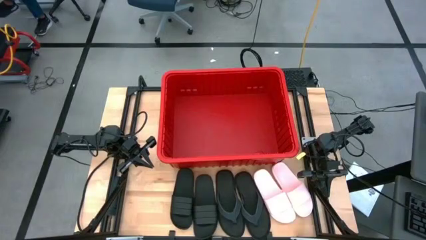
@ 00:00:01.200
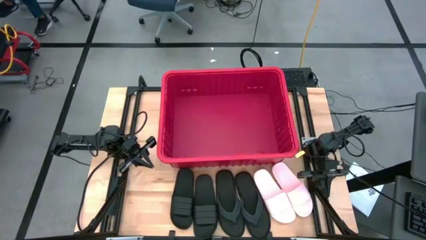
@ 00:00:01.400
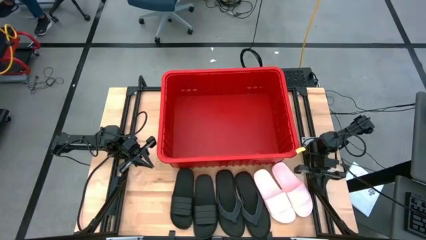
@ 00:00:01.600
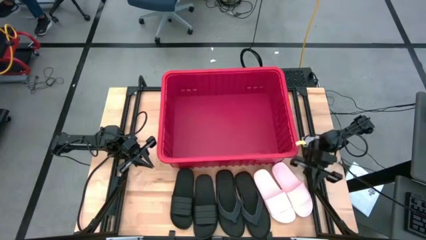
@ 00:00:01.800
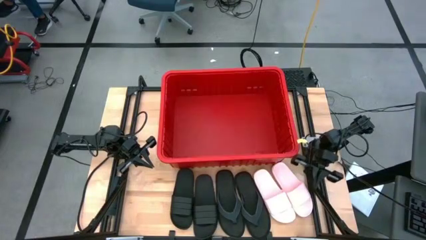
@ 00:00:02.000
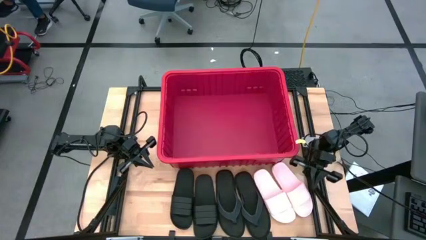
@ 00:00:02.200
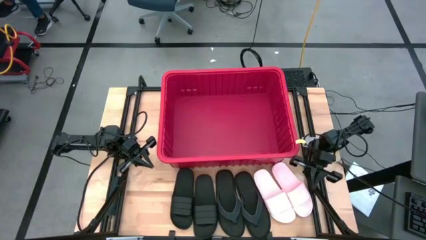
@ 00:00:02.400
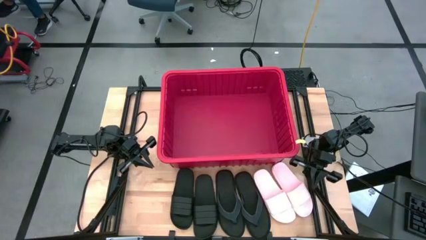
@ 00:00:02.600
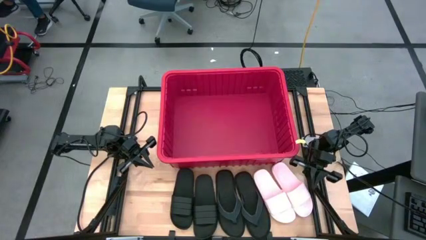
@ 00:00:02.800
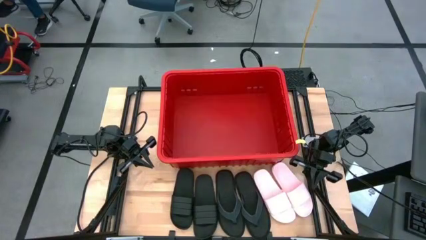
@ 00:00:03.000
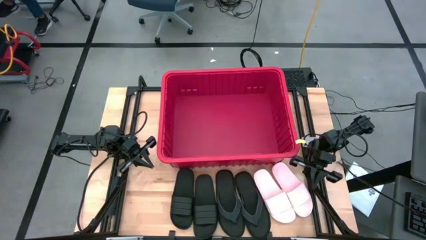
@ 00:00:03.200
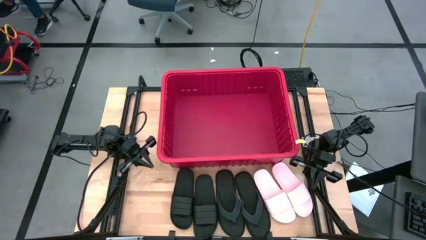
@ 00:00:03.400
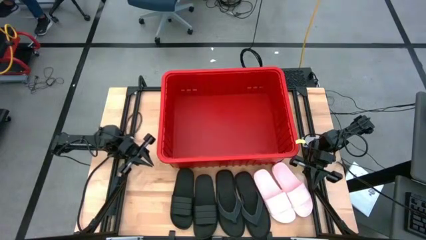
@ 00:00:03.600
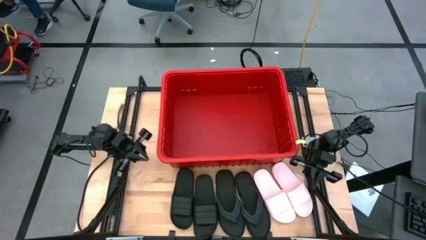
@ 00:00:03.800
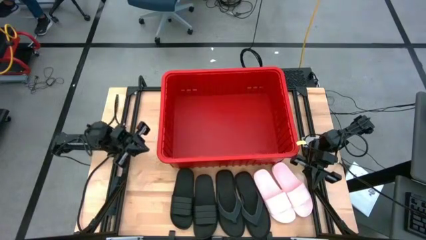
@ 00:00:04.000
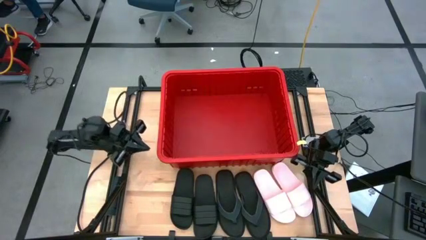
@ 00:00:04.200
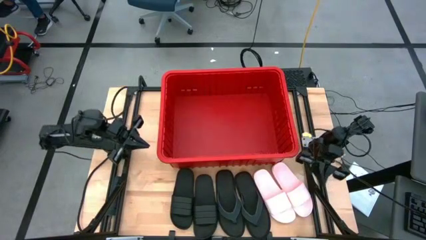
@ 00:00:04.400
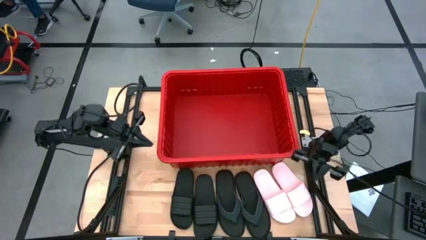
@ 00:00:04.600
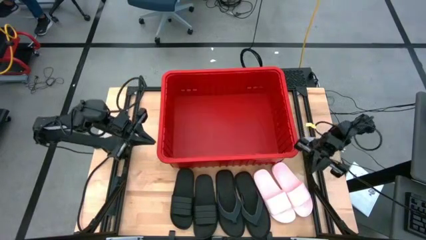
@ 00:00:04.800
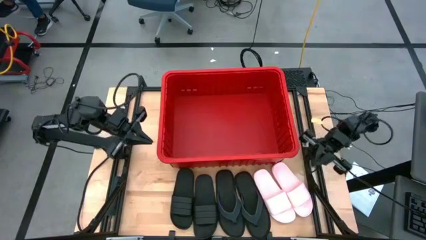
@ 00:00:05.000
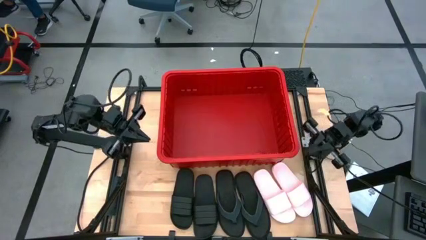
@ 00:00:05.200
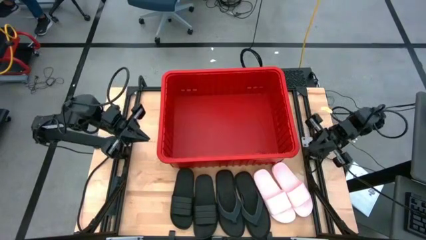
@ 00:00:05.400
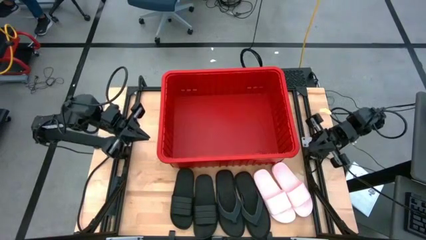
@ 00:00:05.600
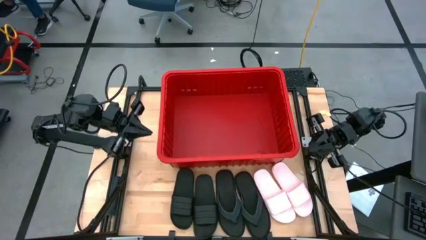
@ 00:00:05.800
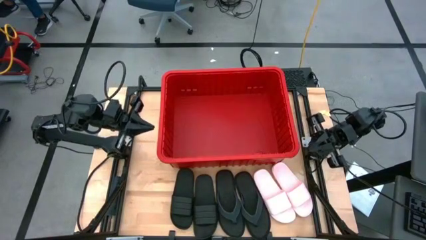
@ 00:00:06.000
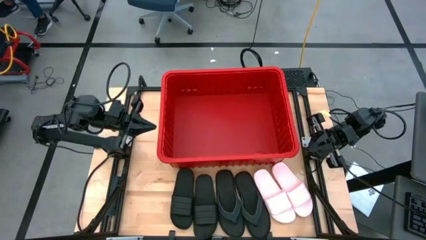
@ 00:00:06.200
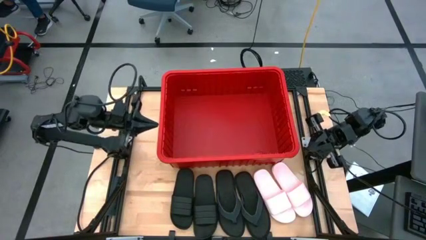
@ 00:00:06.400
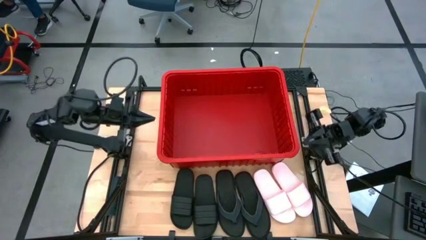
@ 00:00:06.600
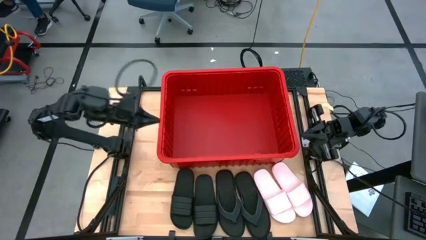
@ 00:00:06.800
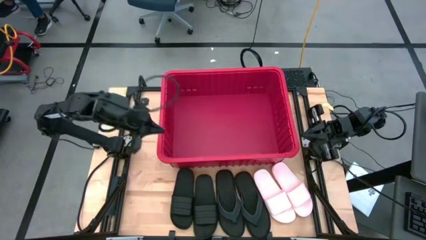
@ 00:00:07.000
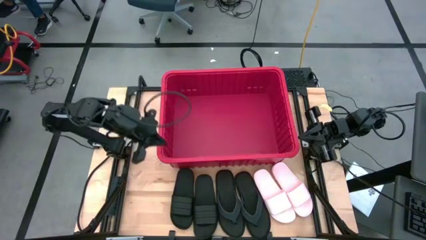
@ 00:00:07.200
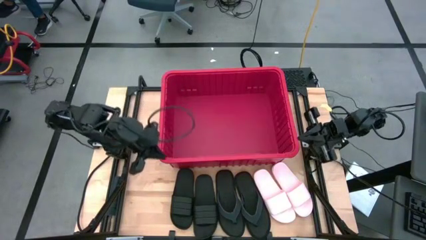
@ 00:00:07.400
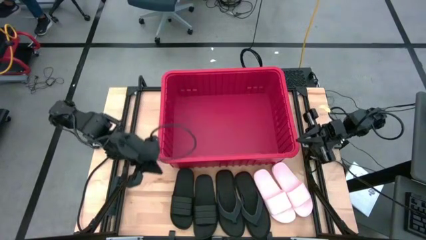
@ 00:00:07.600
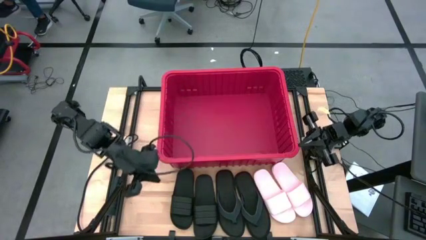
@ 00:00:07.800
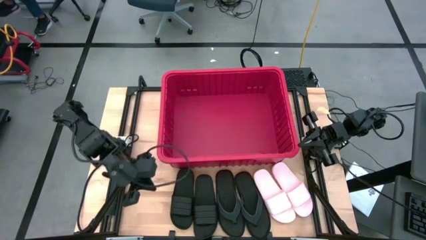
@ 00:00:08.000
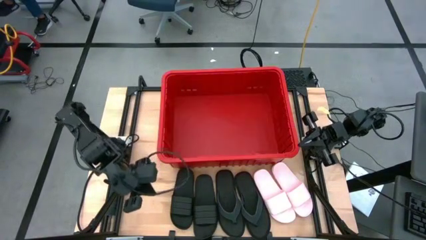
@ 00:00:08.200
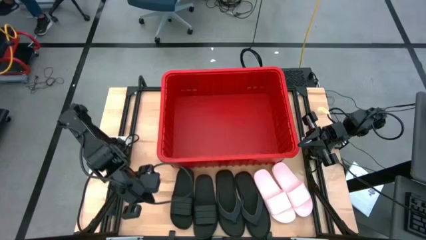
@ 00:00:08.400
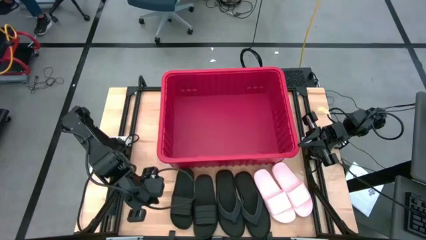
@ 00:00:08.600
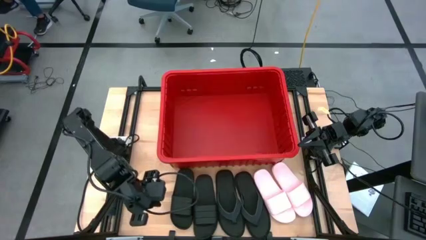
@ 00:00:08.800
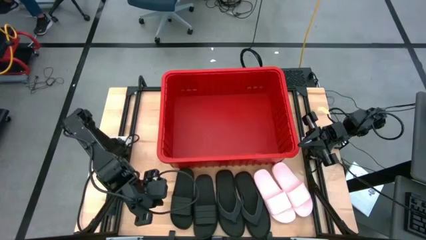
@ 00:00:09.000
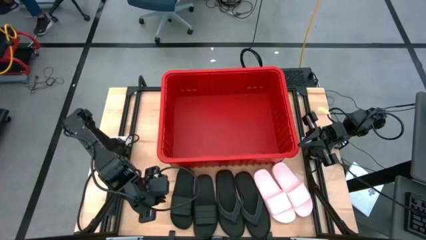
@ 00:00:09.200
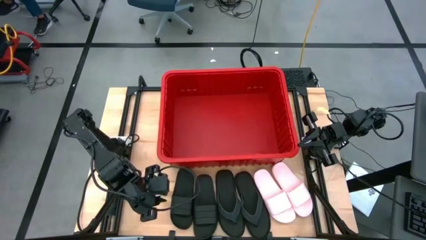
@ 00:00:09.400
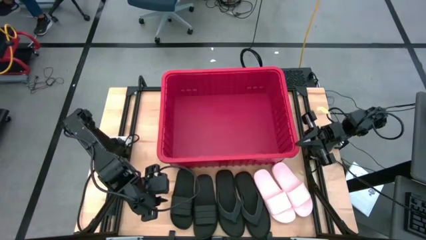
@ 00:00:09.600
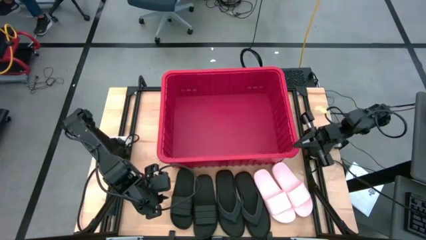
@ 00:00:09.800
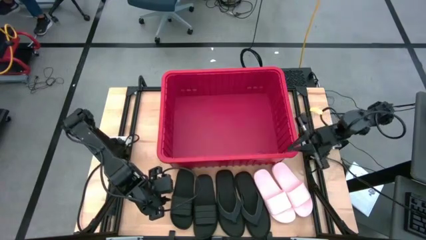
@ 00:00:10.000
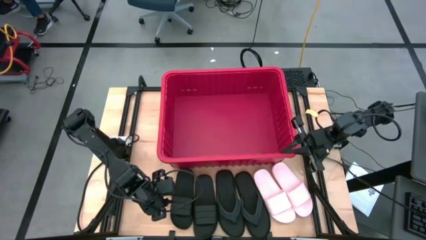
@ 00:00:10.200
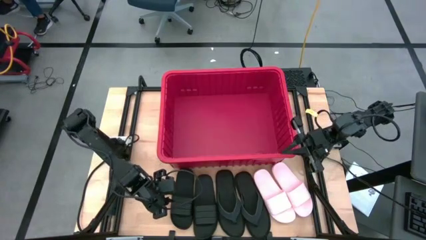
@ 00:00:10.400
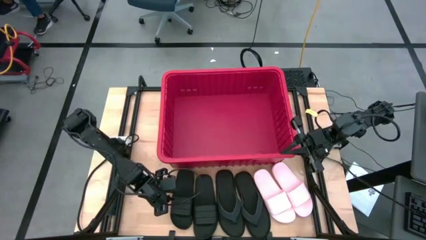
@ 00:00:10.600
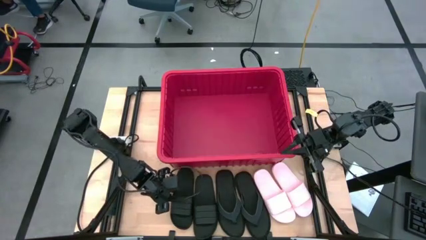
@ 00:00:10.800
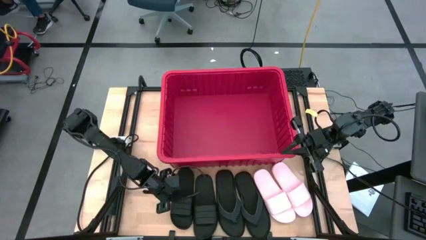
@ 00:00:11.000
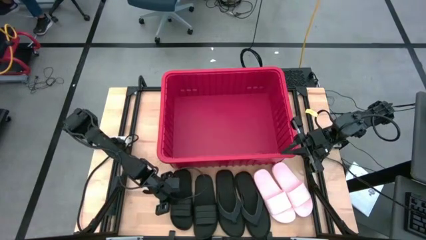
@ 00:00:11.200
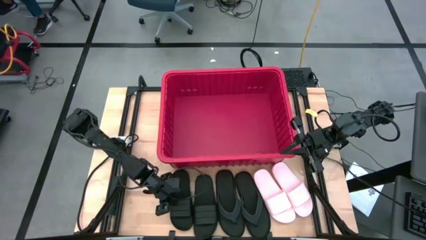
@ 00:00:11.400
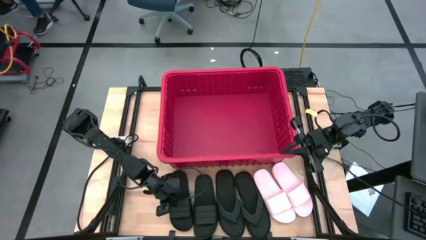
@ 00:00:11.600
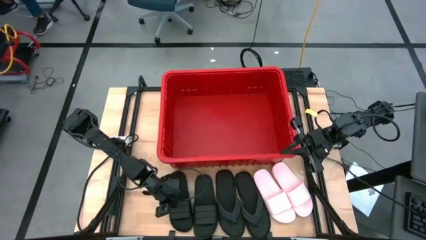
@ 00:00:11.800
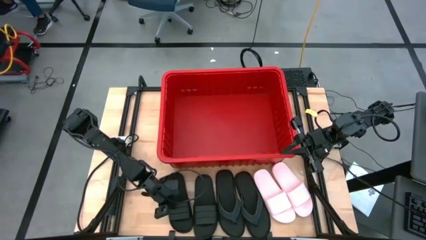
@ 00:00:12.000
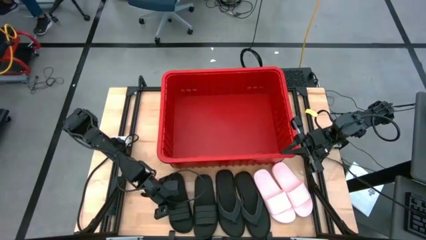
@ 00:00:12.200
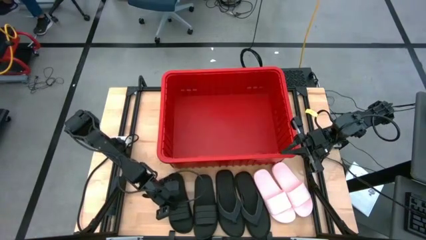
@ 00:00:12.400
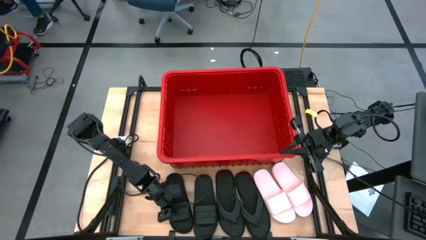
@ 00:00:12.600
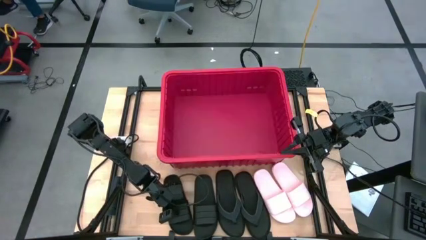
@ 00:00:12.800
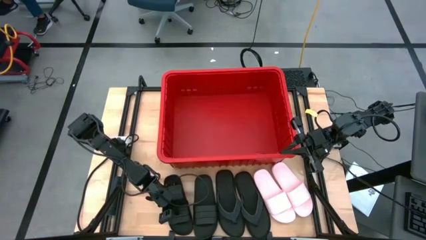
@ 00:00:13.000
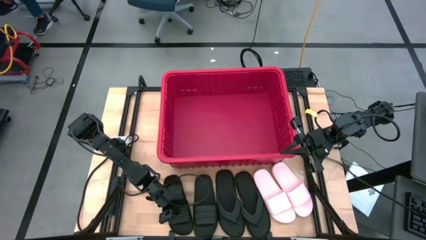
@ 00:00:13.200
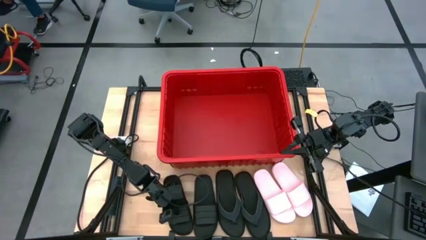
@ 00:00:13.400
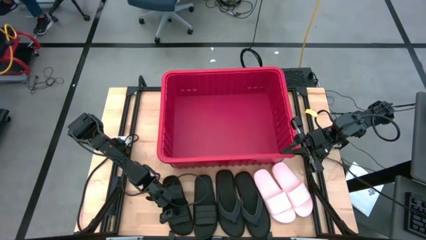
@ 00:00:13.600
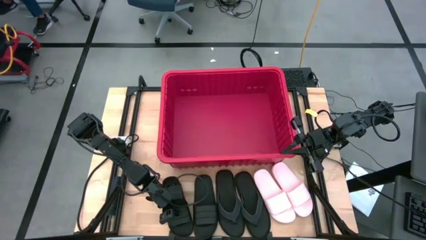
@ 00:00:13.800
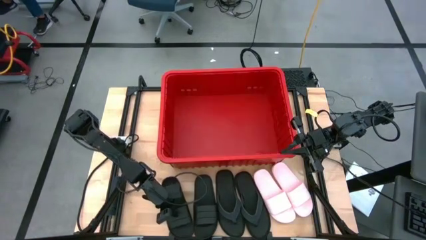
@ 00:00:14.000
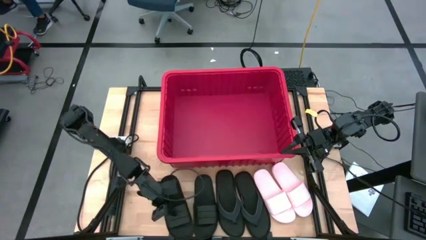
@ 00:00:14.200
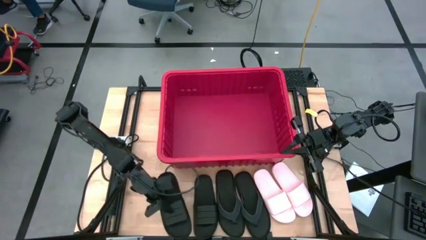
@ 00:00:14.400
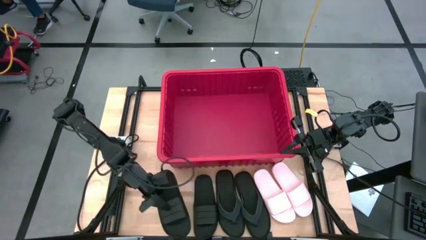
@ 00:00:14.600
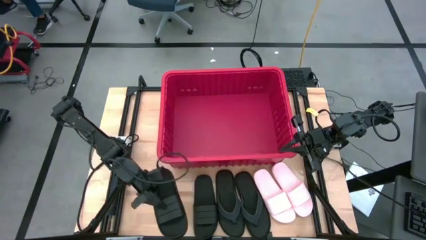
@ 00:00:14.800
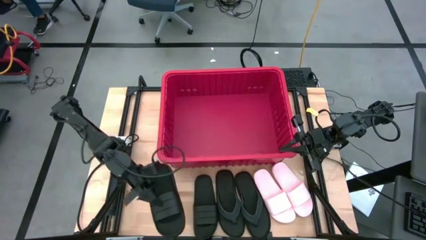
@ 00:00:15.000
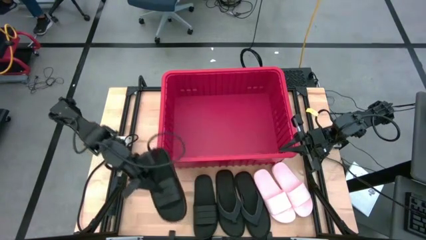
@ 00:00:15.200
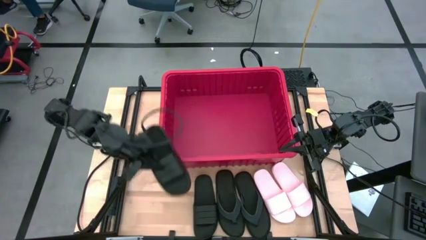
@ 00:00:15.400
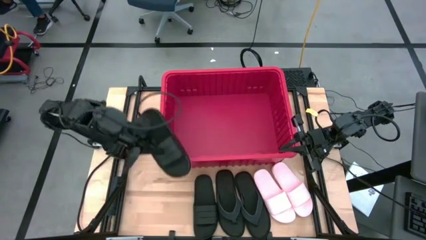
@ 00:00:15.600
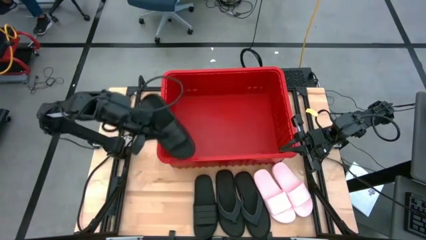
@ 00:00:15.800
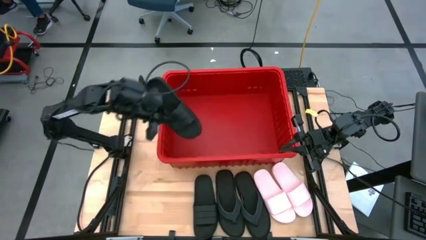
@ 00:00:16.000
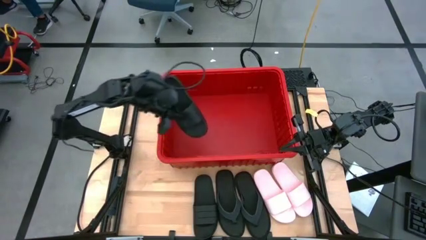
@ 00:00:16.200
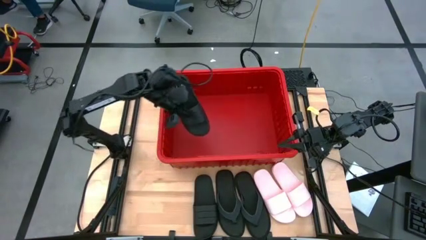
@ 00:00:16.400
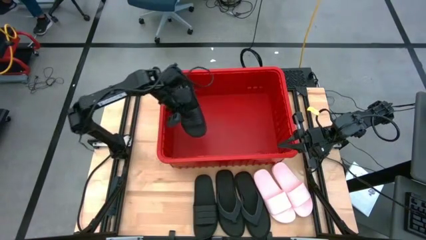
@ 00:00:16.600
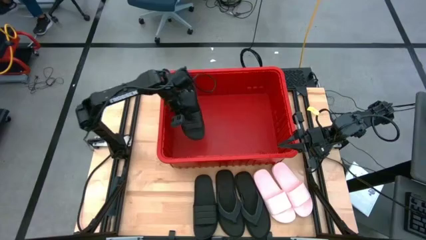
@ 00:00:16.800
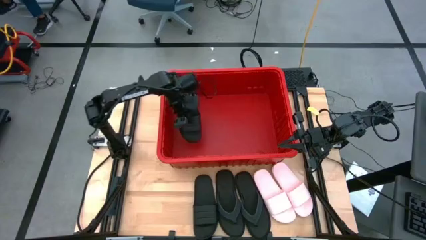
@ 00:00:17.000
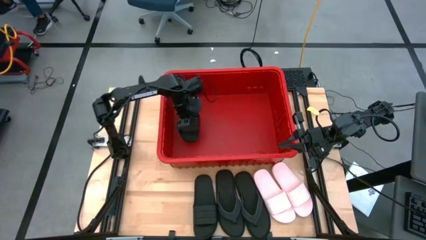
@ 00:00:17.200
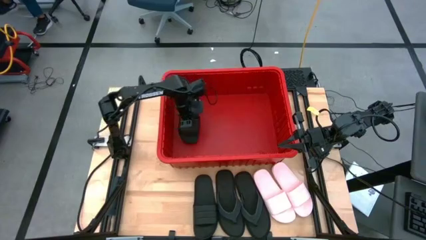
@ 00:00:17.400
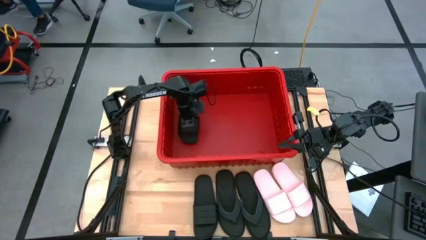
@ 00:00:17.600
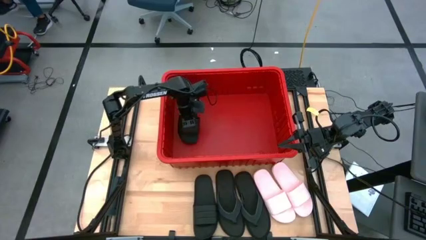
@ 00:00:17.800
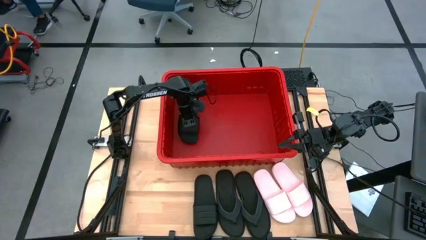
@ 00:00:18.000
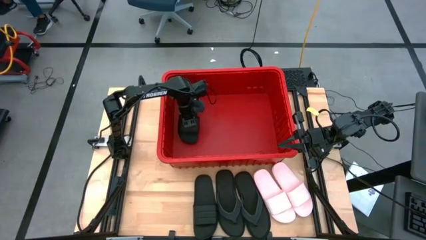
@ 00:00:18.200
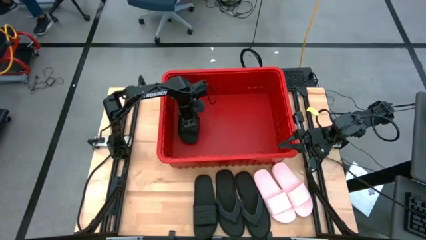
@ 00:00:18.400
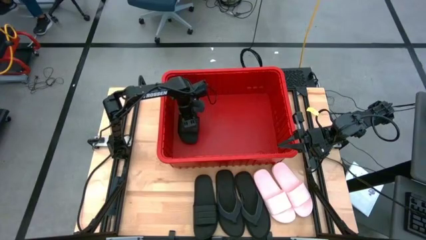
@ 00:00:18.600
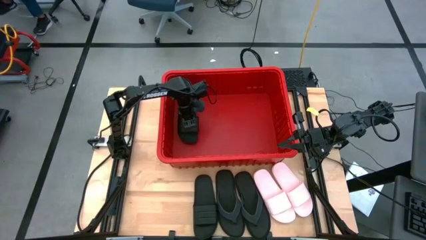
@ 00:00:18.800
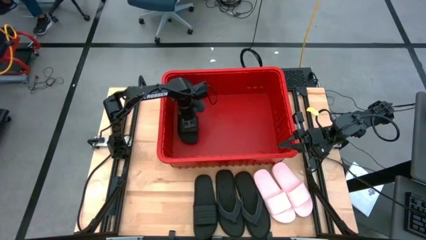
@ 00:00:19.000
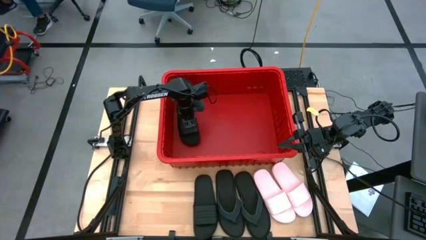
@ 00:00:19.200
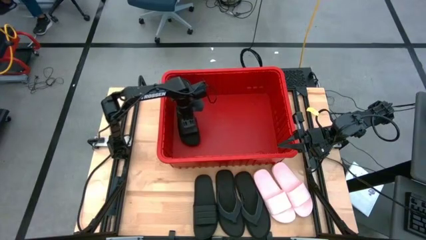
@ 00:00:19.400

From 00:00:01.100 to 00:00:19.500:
Task: Pick and place slides into bin
Put the left black slide into the red container
